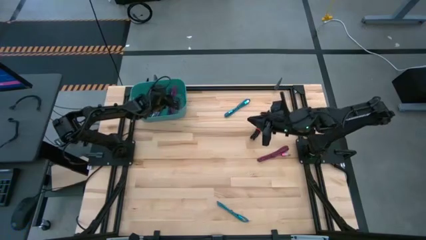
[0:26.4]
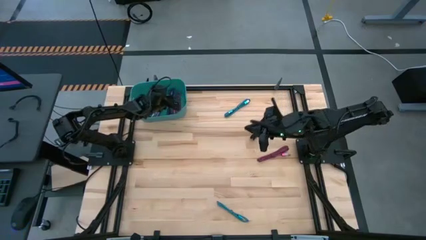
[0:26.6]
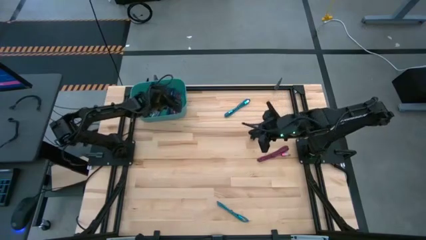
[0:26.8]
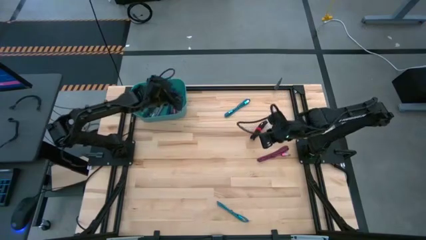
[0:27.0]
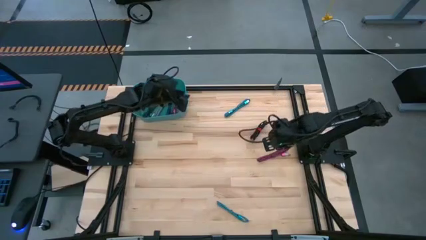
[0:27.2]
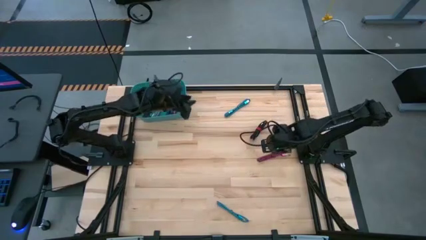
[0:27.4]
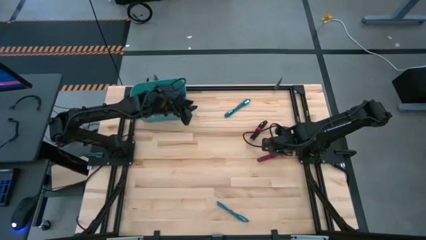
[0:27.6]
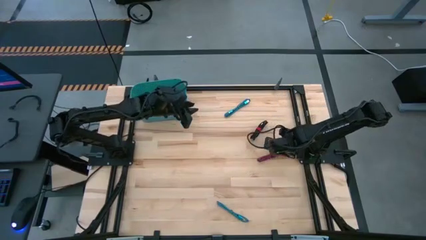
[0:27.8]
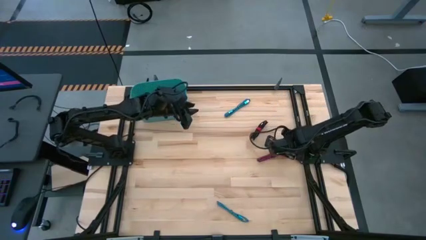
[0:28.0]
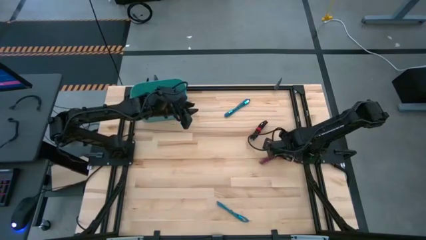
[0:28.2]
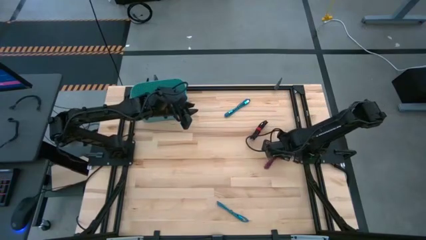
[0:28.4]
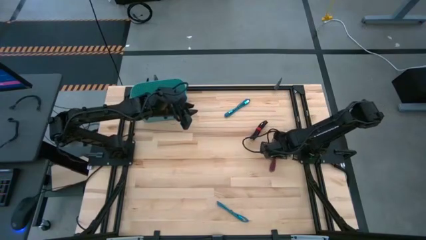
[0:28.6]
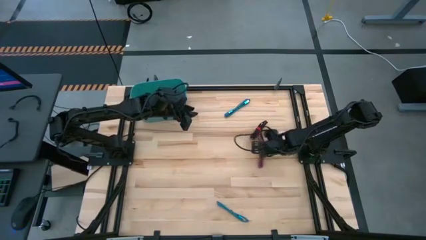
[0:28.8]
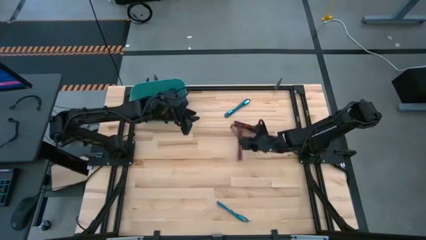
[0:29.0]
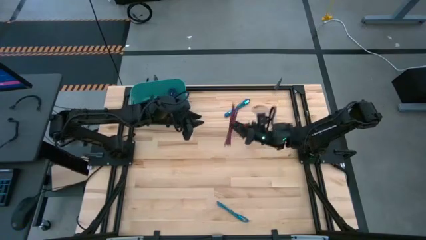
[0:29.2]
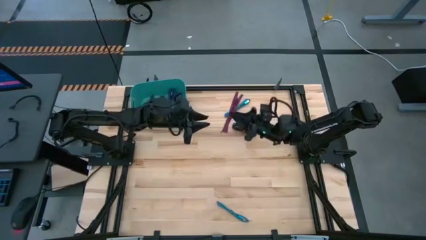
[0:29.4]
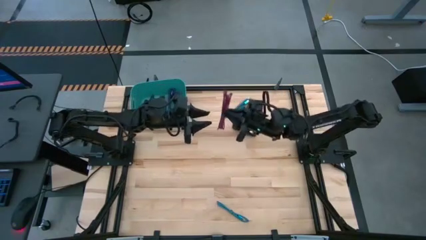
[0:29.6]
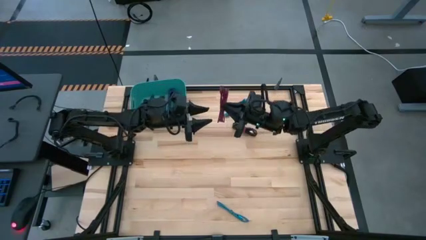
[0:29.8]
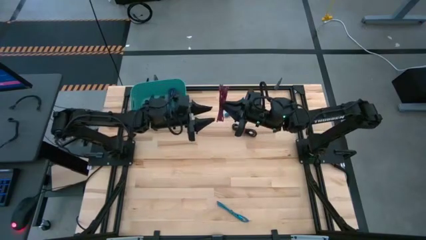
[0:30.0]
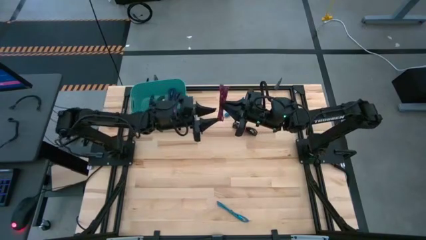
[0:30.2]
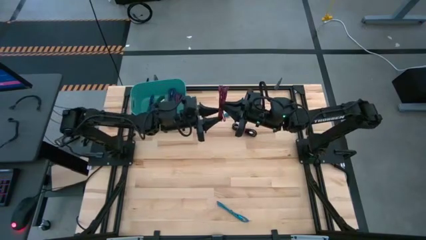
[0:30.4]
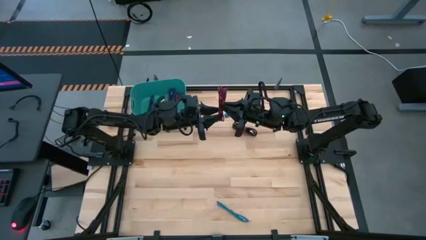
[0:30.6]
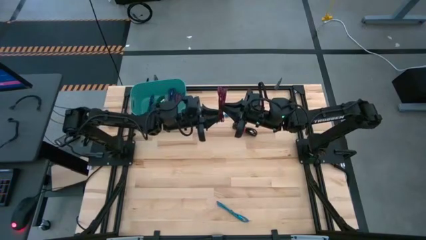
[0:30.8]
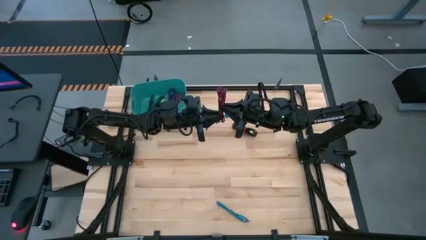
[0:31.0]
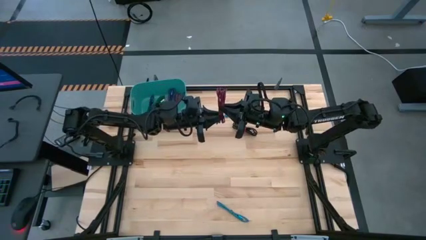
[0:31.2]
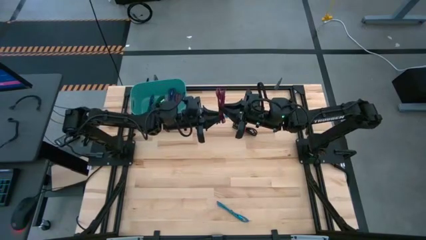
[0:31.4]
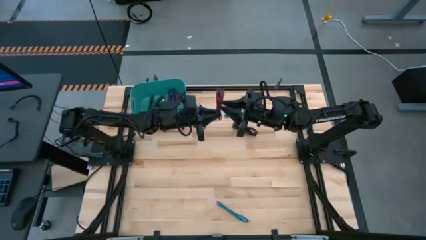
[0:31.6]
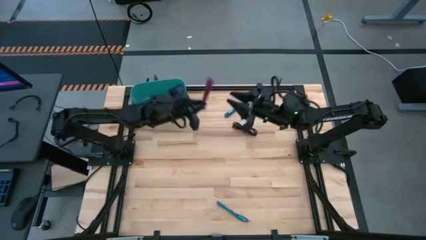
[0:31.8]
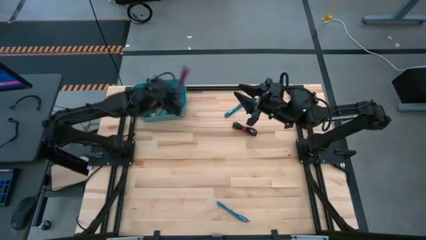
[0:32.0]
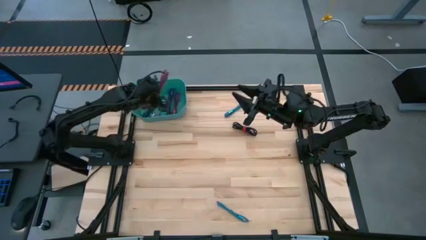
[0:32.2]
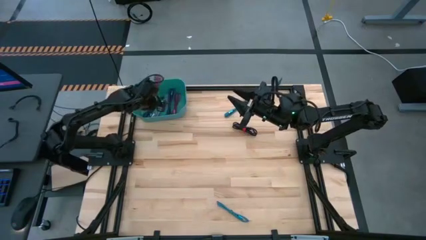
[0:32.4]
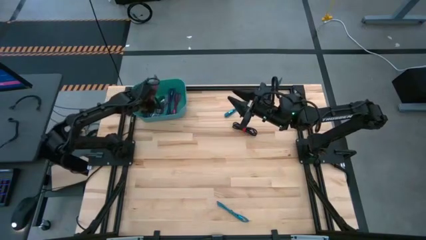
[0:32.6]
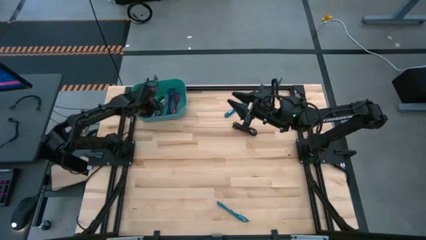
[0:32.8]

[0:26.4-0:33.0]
Task: Pick and place USB-C Cables
Put the pink charger cable into the green bin

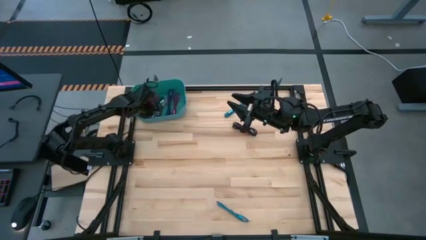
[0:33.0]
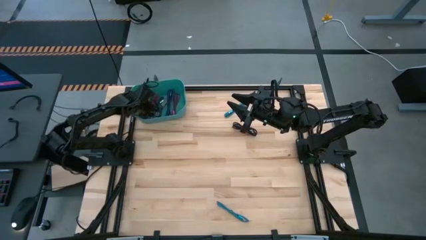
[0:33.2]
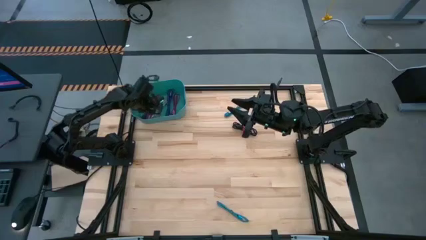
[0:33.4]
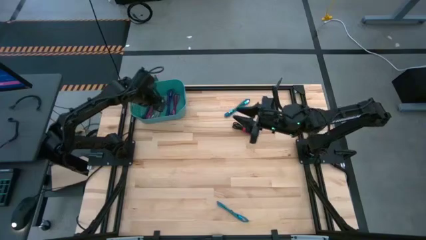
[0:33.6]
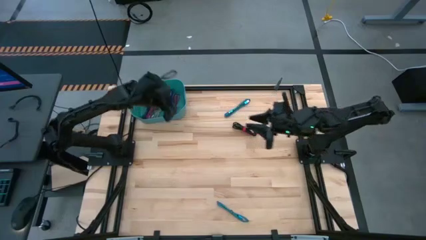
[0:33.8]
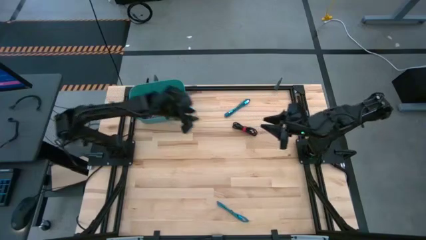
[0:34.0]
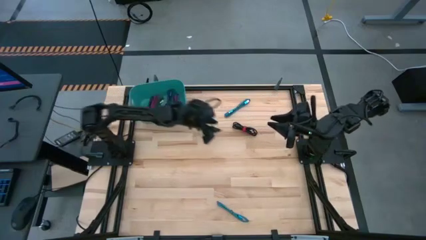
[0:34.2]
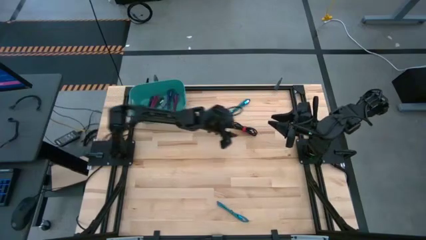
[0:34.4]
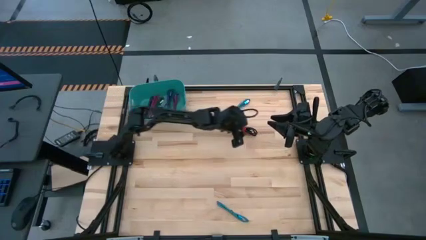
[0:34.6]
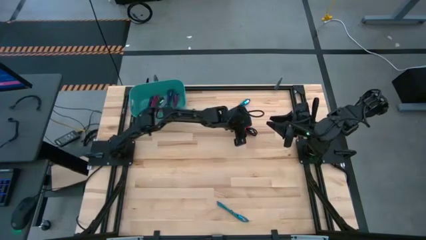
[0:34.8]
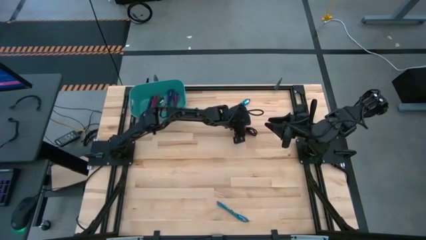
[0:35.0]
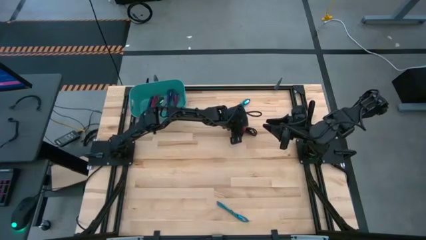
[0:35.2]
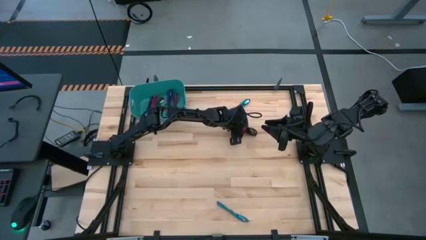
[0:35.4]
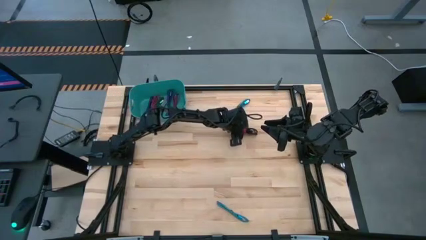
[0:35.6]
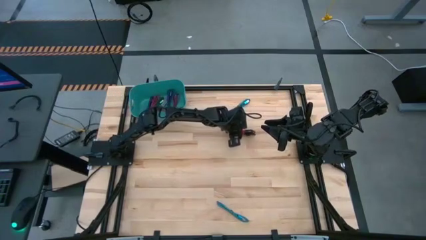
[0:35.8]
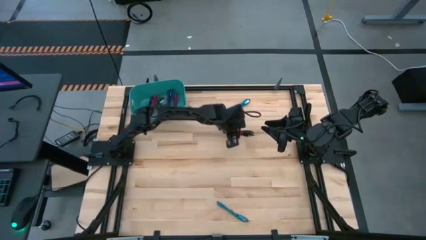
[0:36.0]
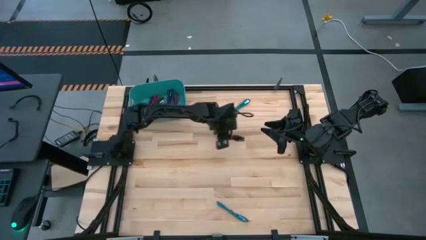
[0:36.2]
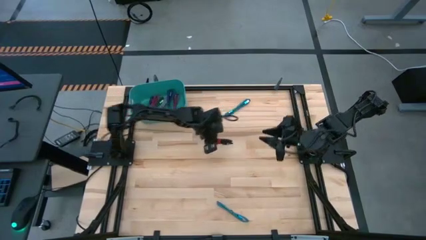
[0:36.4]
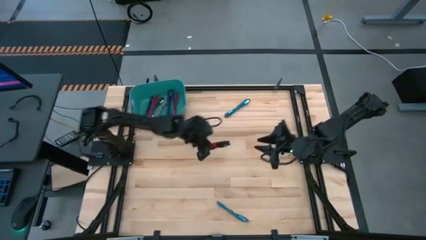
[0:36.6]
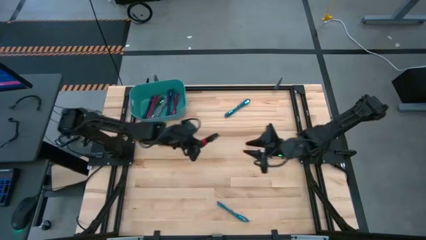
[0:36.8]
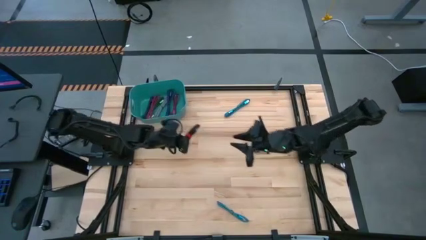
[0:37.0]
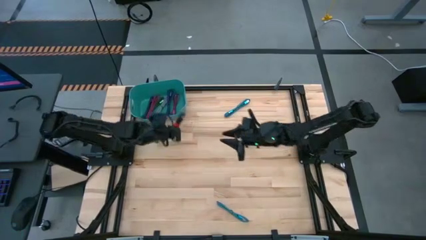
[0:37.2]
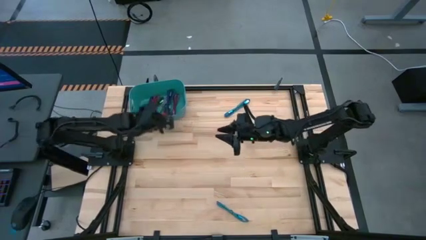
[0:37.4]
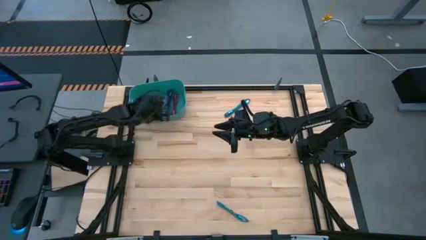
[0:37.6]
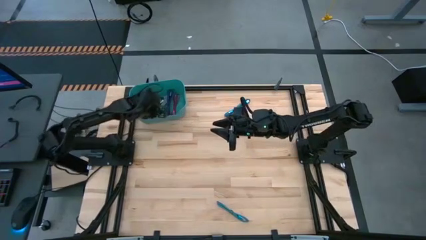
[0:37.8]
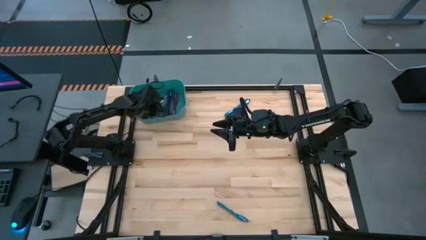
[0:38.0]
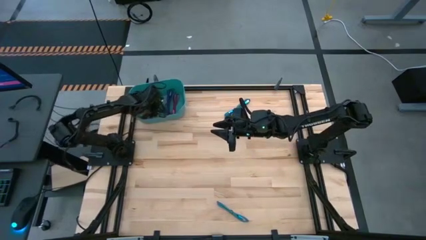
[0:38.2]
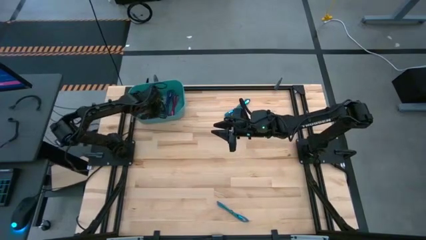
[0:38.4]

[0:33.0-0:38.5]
Put the black charger cable into the green bin

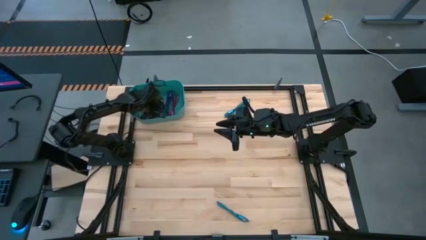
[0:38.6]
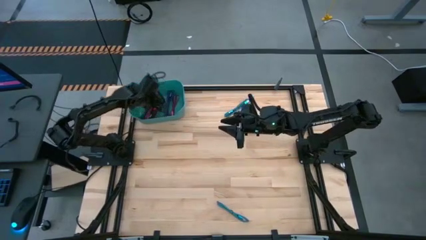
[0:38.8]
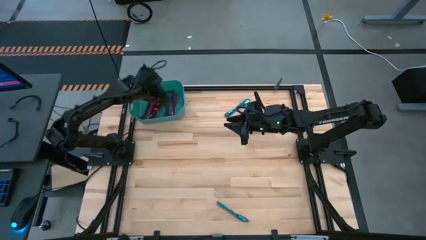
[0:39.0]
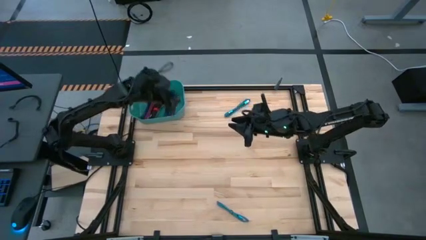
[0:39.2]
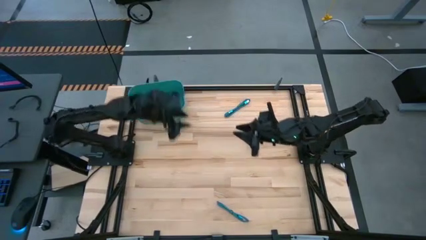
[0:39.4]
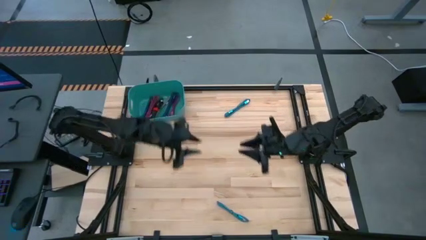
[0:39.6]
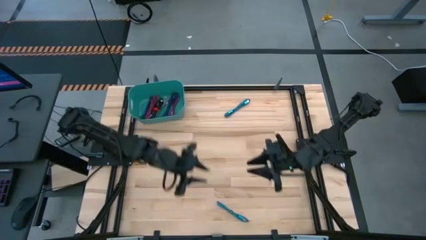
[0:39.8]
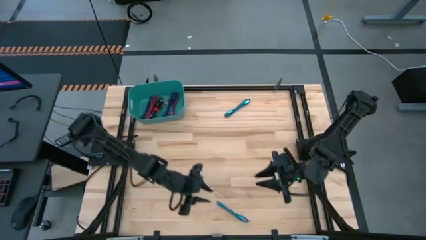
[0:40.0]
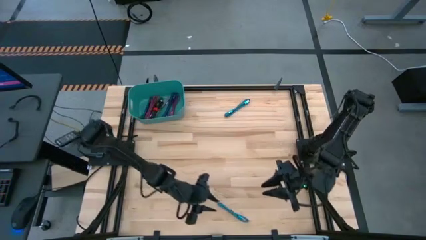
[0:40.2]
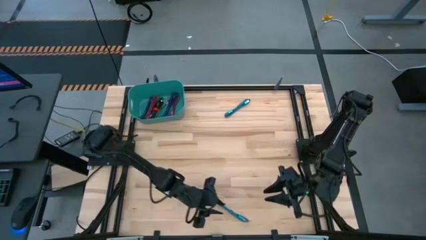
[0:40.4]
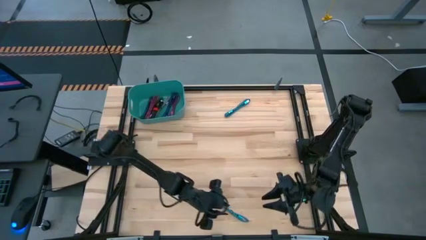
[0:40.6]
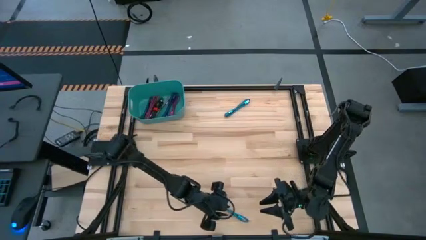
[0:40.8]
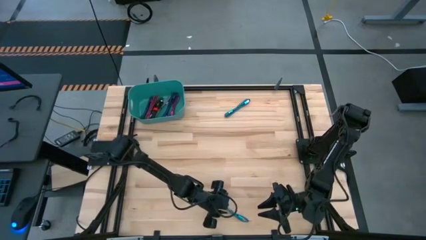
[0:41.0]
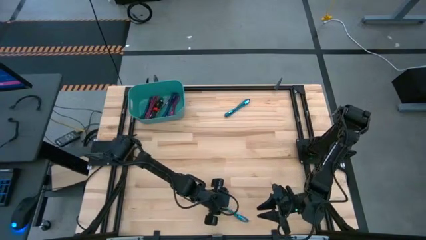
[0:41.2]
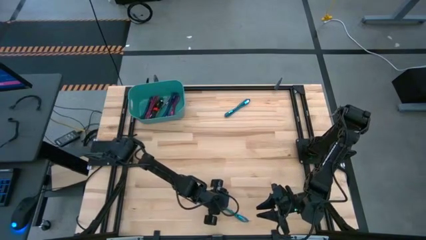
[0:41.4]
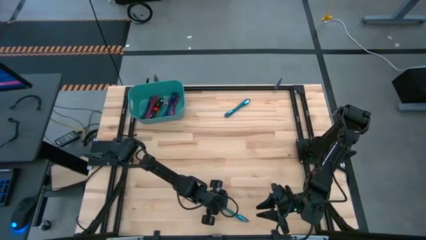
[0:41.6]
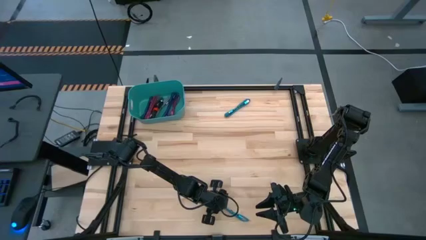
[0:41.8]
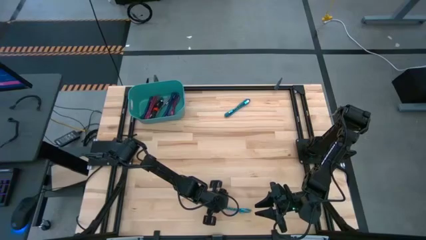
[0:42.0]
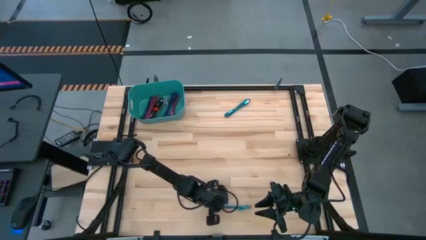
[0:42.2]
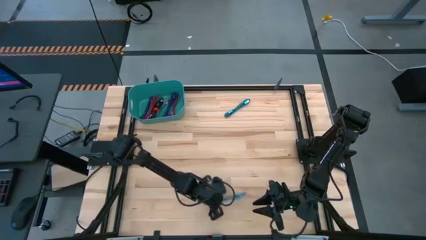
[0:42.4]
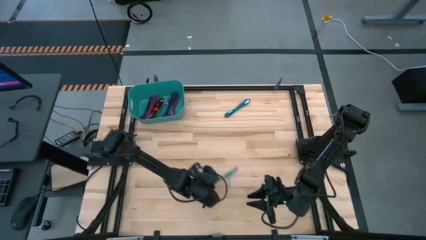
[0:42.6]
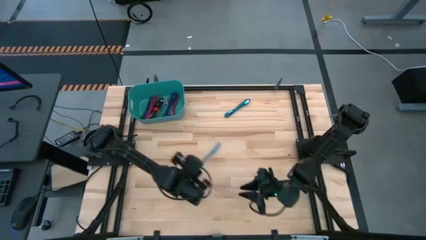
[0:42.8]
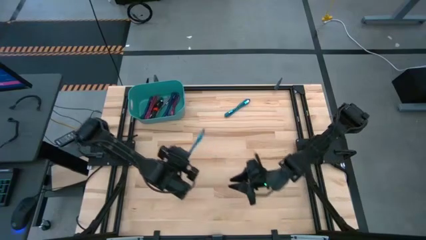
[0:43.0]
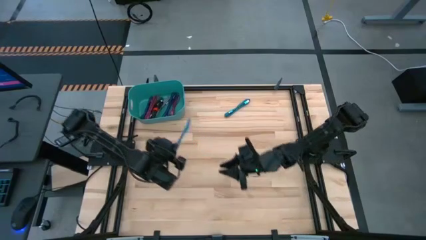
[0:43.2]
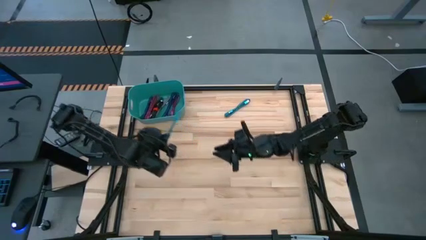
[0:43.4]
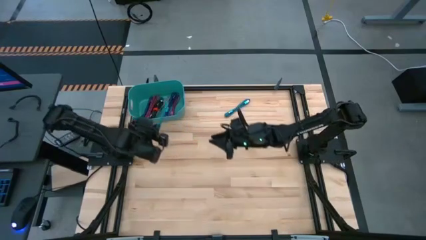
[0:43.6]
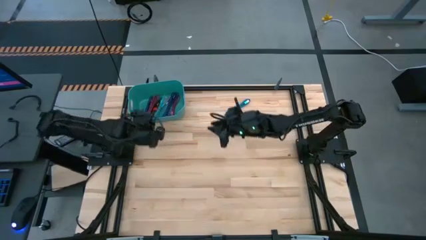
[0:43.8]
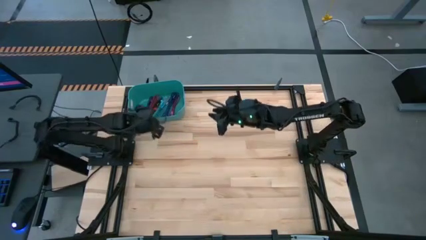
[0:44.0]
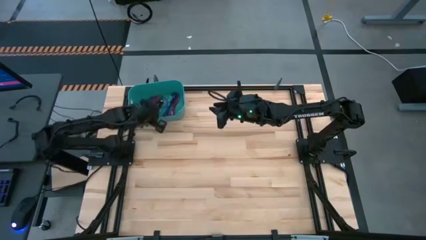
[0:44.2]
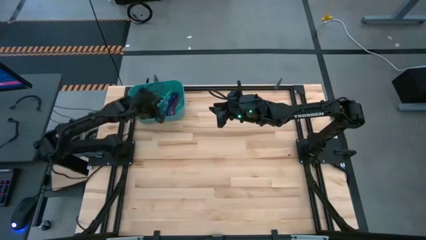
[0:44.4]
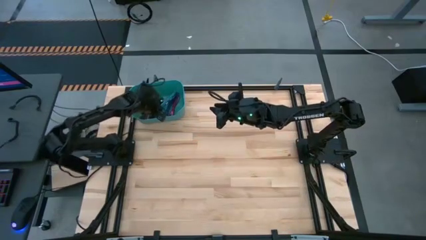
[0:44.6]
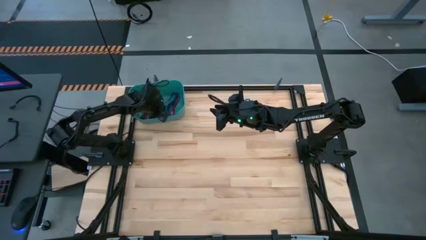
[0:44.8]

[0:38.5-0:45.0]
Put the bottom blue charger cable into the green bin
